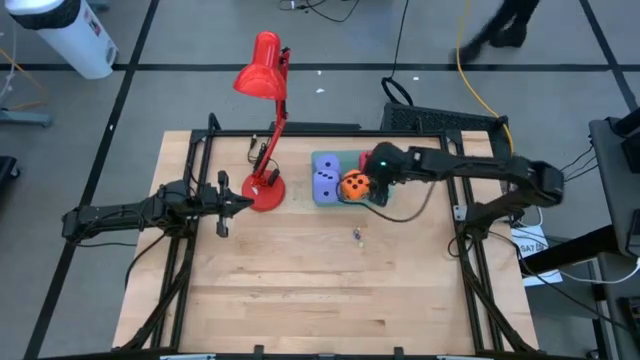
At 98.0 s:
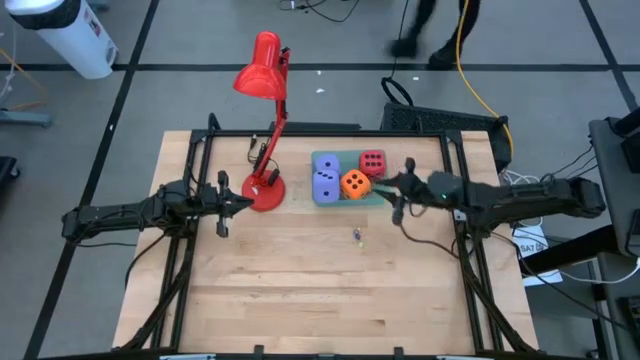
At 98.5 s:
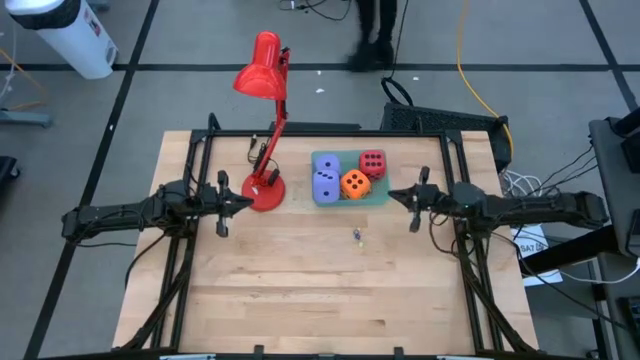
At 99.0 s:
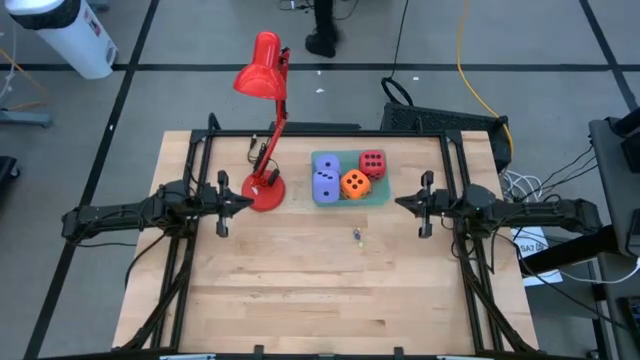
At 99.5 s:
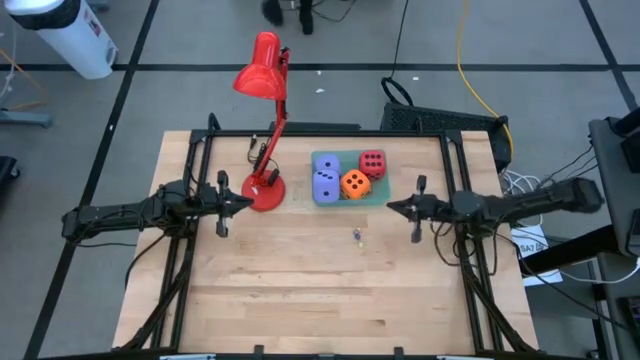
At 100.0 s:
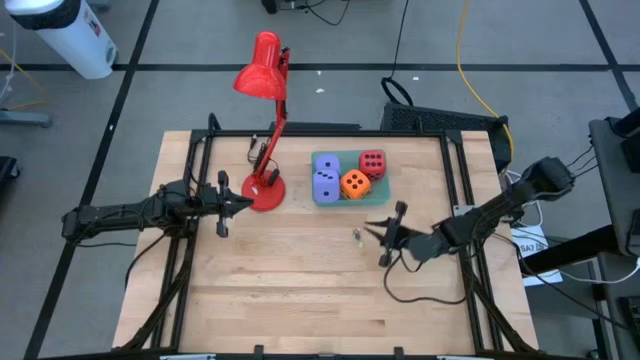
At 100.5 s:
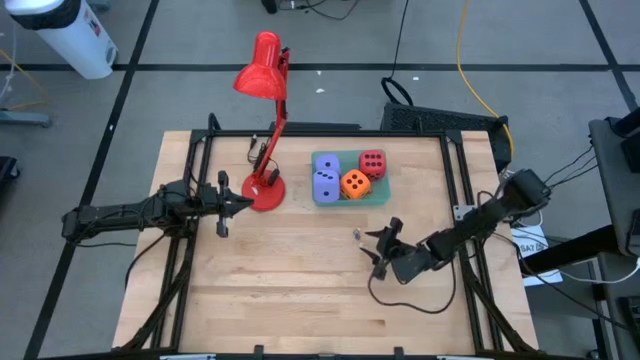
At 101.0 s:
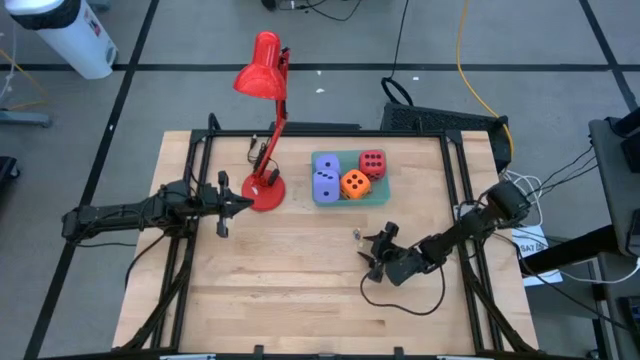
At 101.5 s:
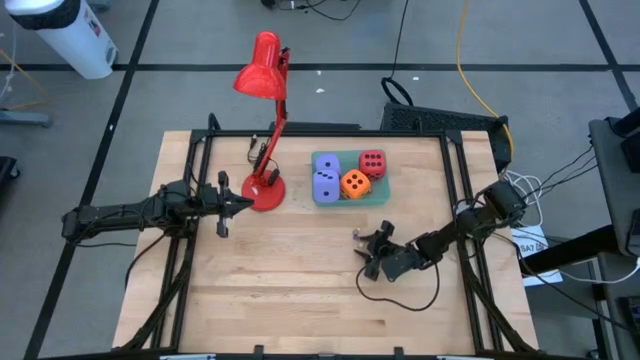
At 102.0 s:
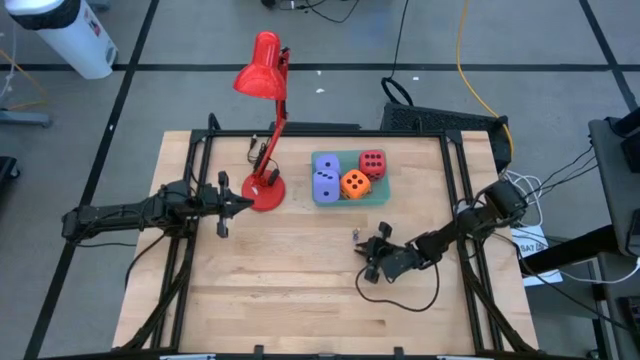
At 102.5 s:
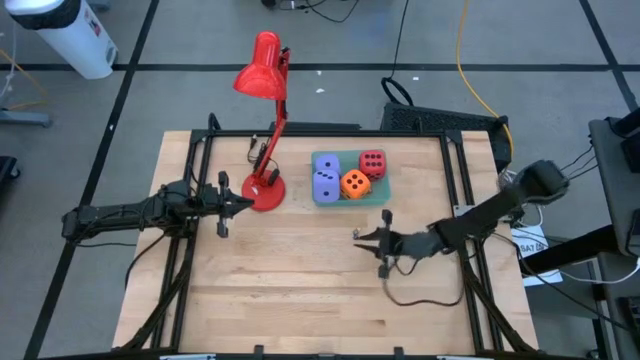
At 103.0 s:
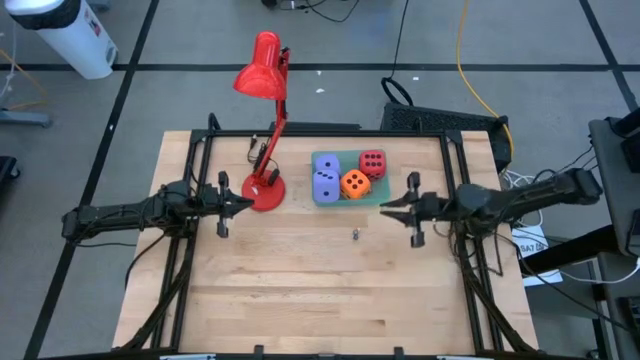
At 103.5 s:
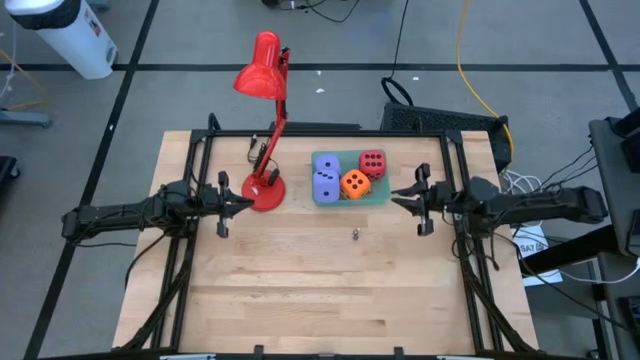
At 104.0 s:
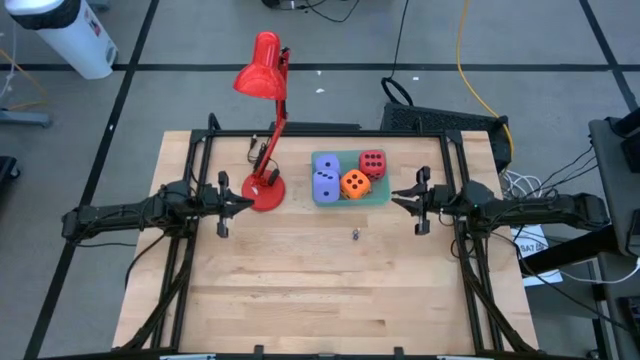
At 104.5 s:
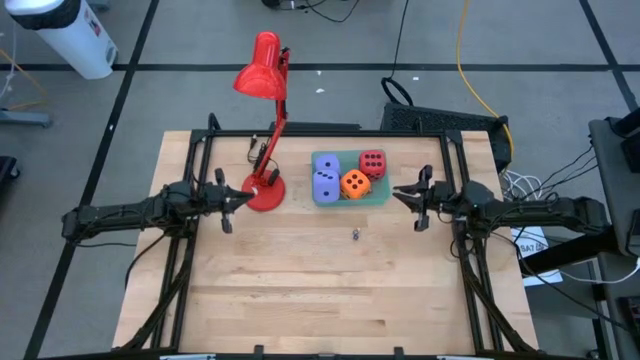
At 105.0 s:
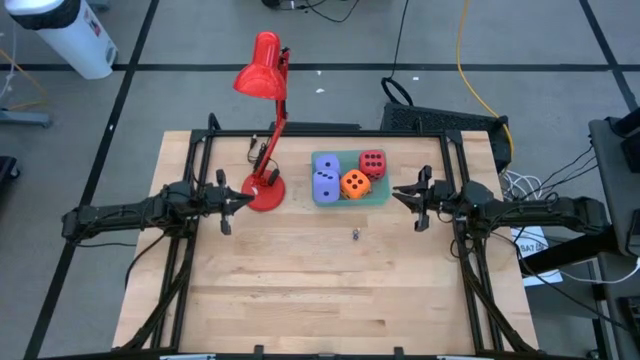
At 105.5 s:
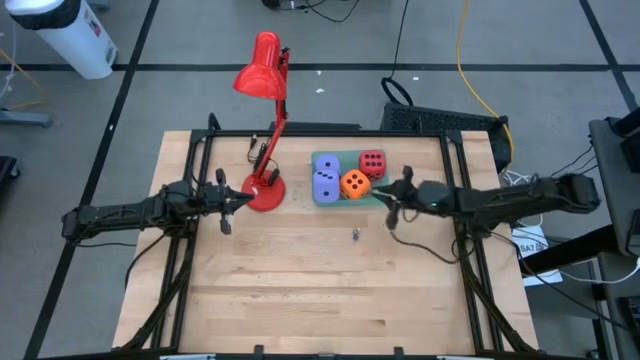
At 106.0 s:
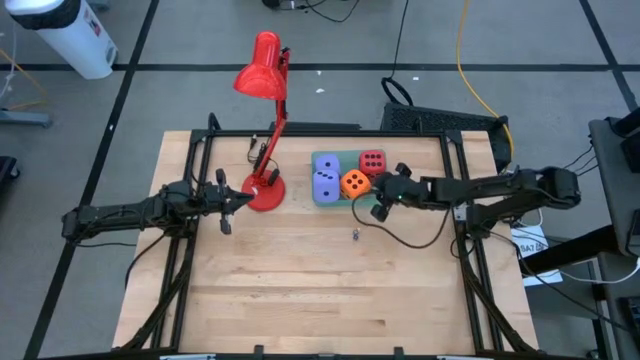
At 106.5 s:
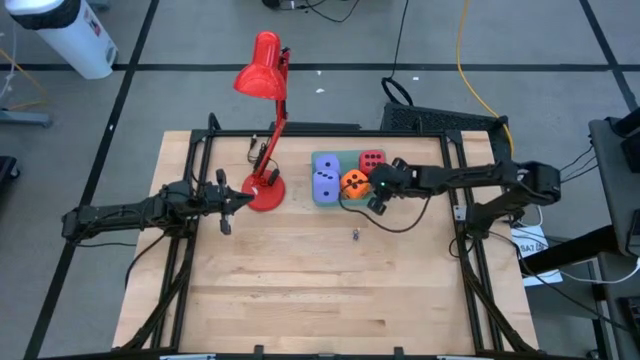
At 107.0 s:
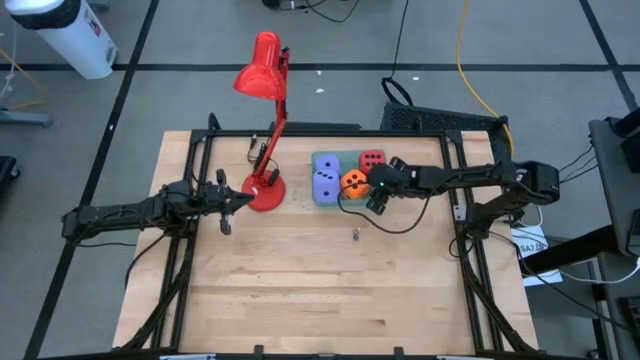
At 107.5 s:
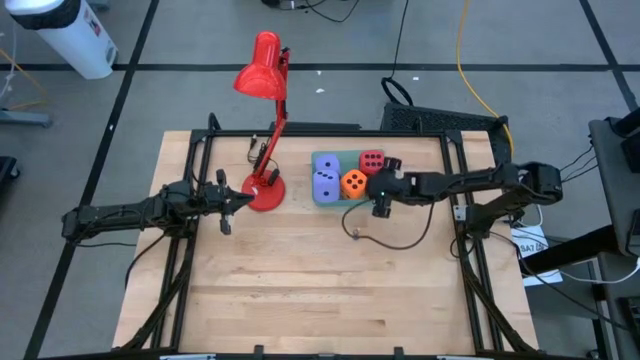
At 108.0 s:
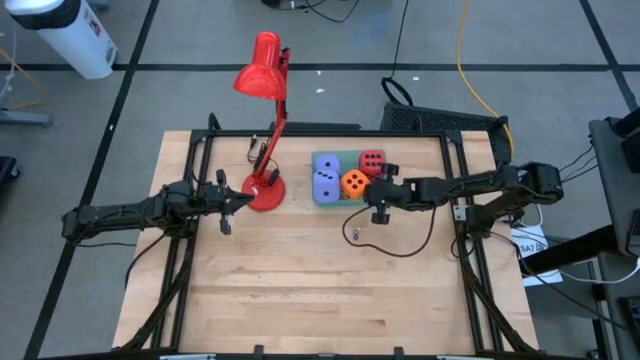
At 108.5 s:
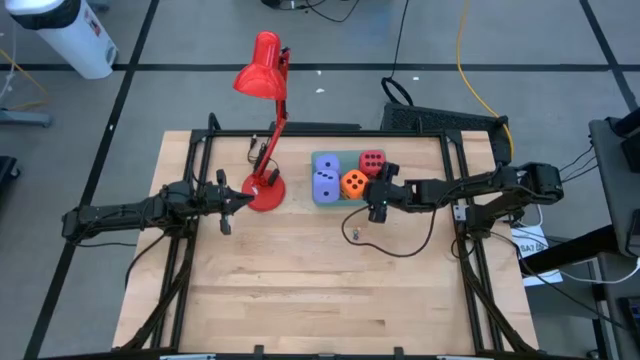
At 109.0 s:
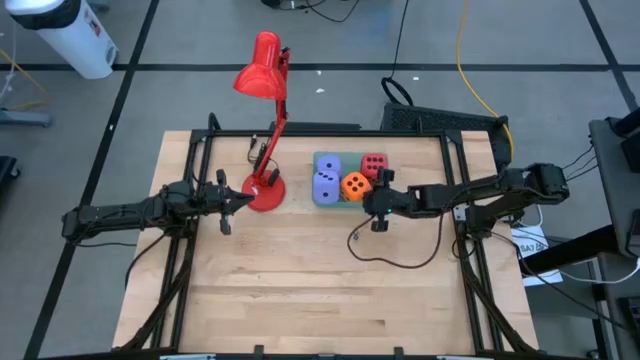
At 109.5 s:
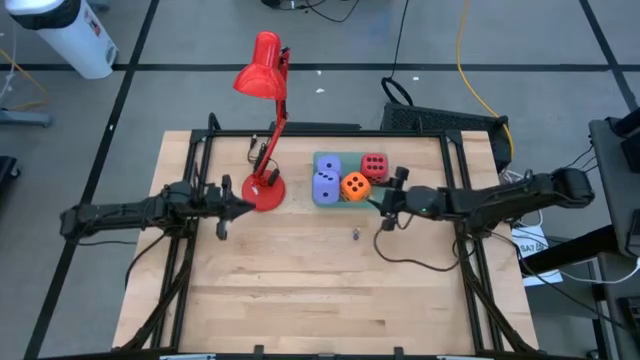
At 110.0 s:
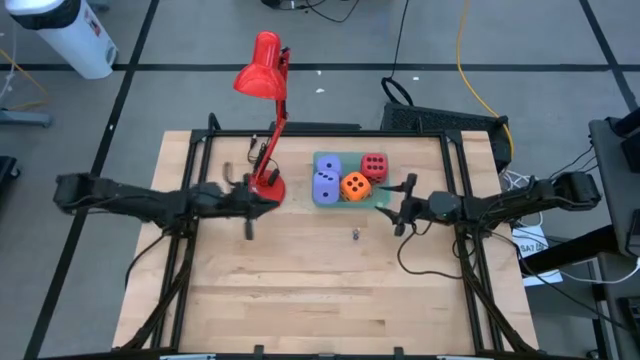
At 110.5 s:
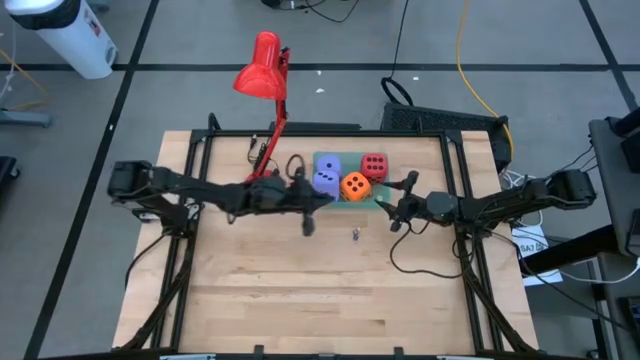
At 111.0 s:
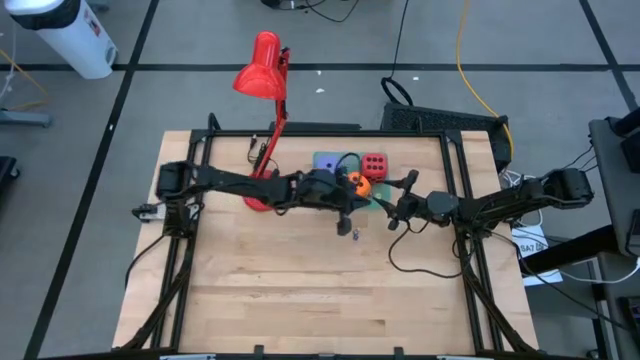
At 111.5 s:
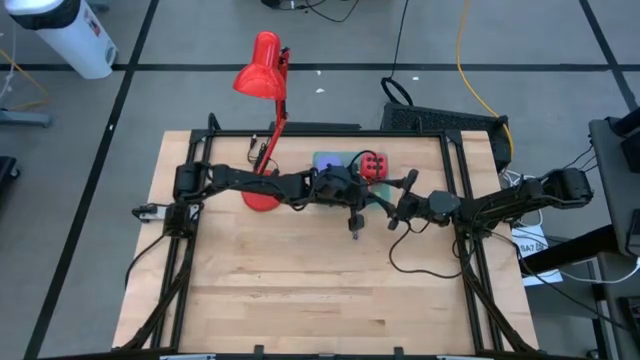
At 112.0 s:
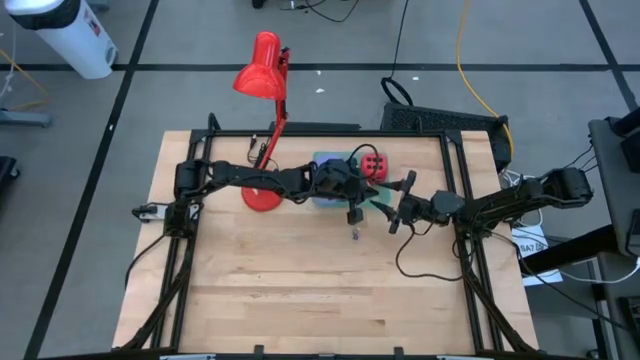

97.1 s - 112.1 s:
Task: Pick & Place Dice
Put the light green die into the green bin

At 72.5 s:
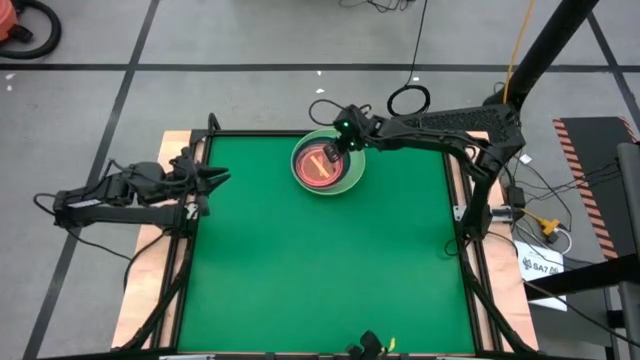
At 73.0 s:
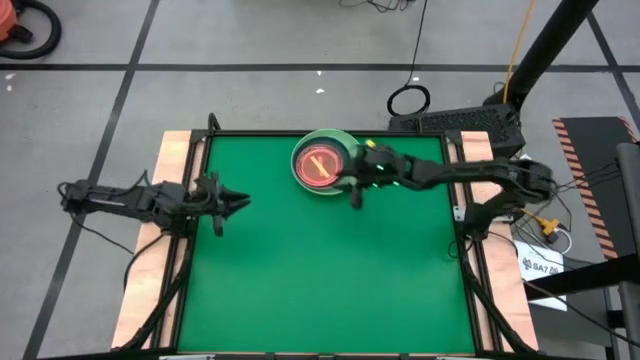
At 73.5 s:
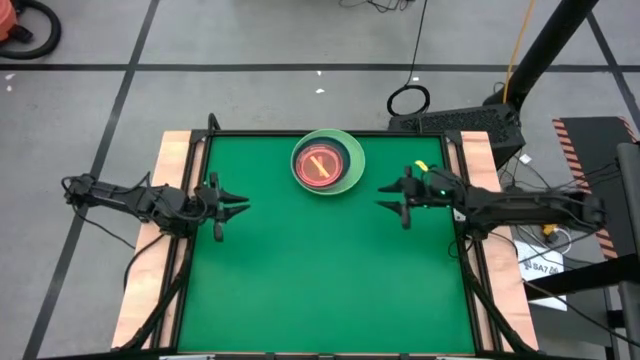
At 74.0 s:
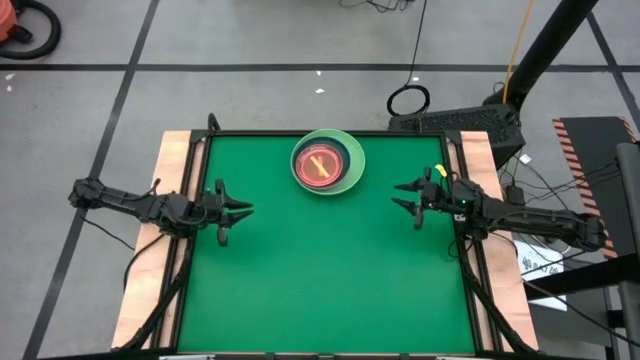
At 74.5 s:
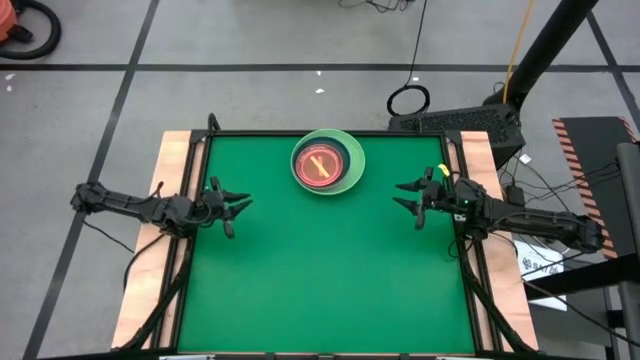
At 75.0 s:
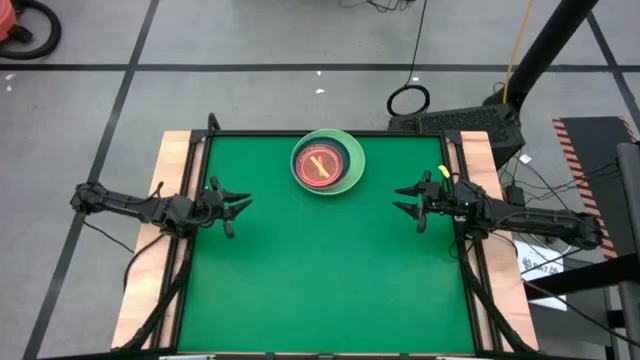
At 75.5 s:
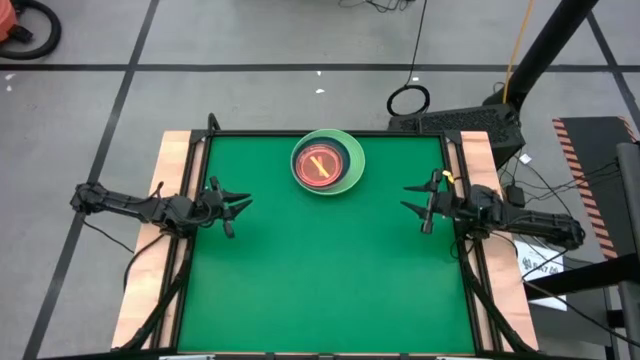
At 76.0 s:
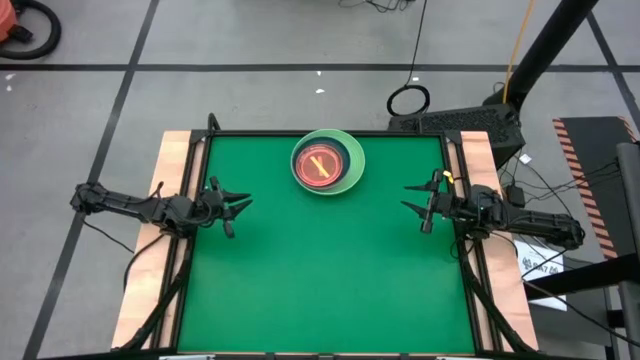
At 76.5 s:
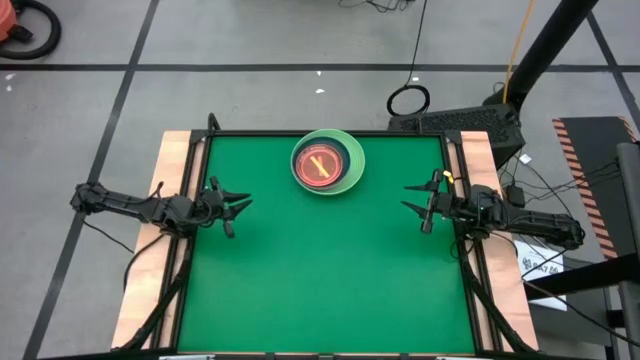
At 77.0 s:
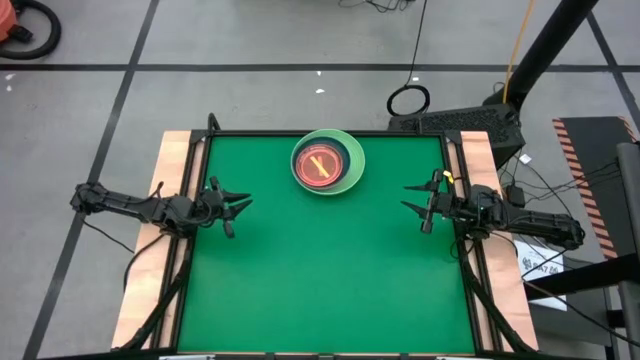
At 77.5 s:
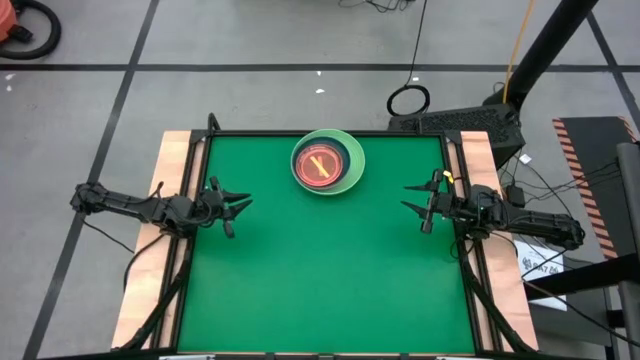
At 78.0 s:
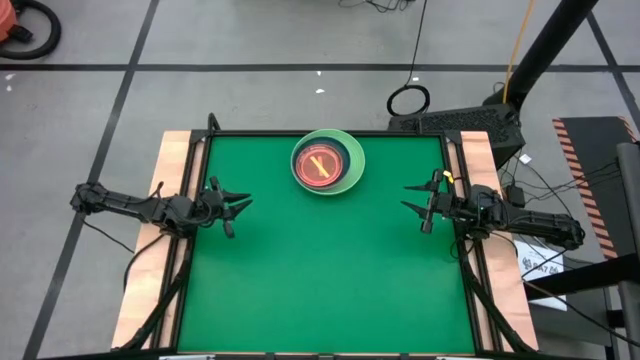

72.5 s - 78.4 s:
Task: Stack plastic plates
Return to Home Position
